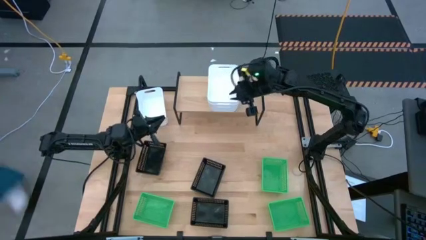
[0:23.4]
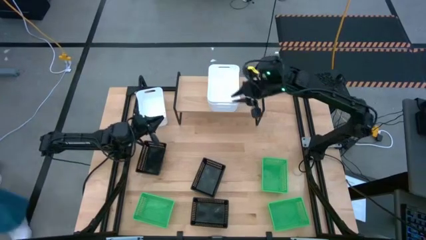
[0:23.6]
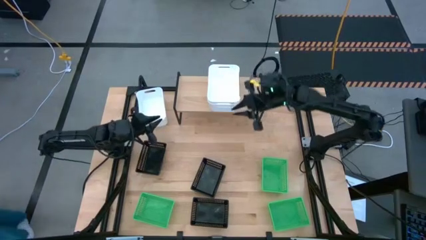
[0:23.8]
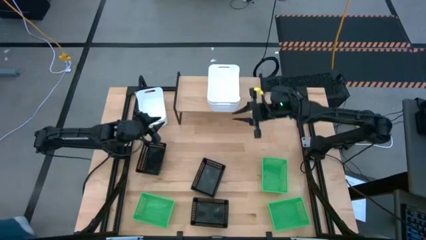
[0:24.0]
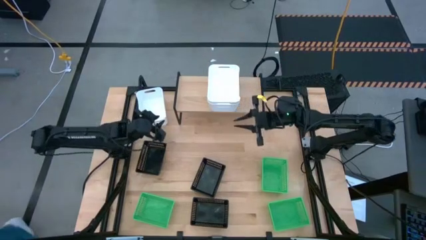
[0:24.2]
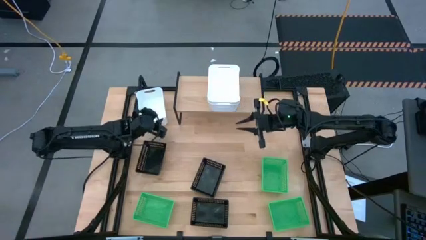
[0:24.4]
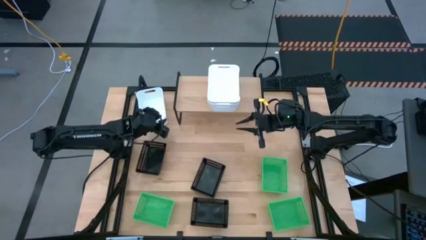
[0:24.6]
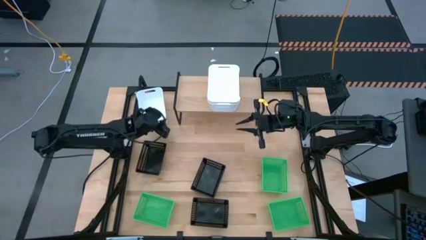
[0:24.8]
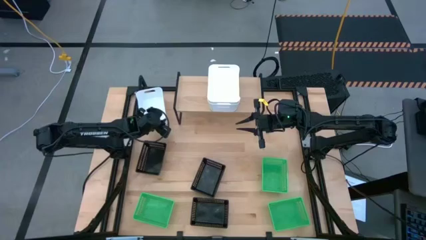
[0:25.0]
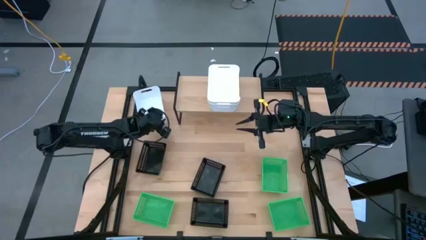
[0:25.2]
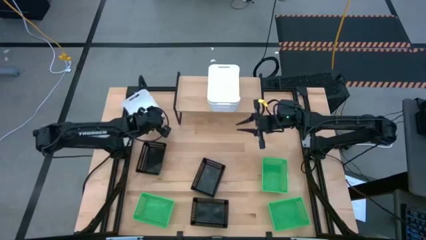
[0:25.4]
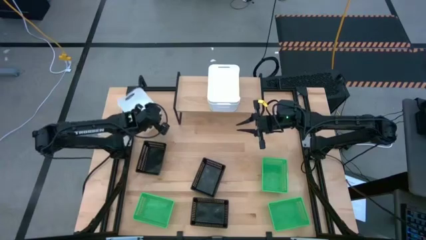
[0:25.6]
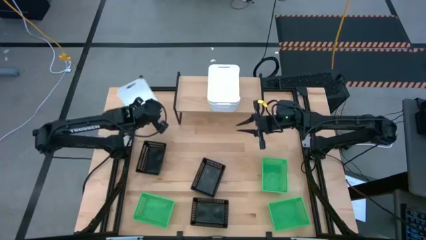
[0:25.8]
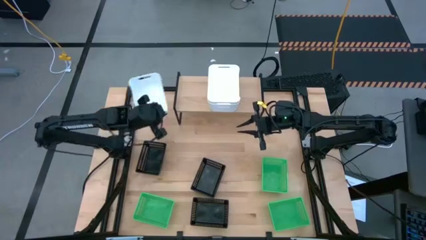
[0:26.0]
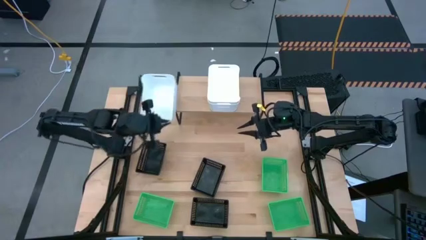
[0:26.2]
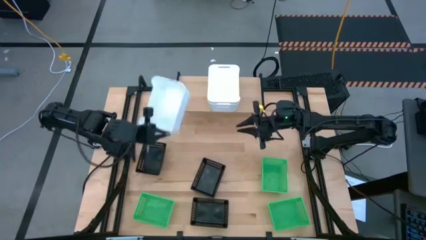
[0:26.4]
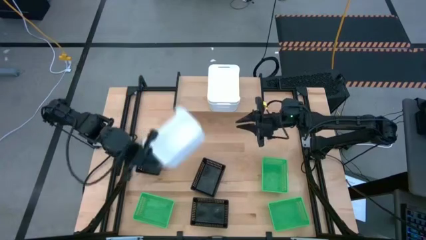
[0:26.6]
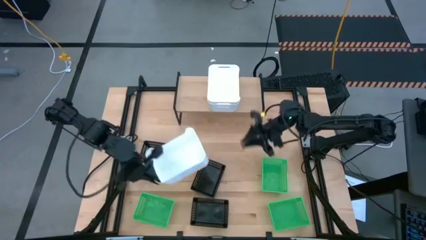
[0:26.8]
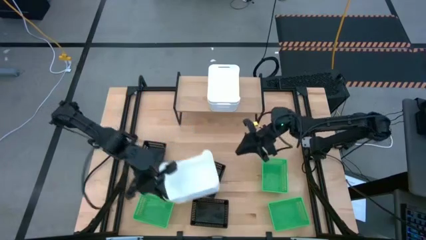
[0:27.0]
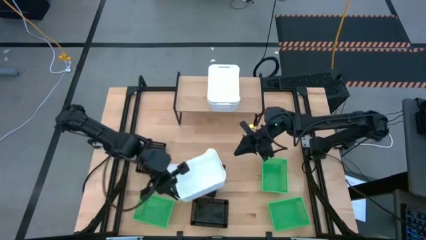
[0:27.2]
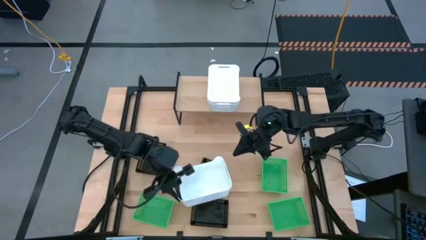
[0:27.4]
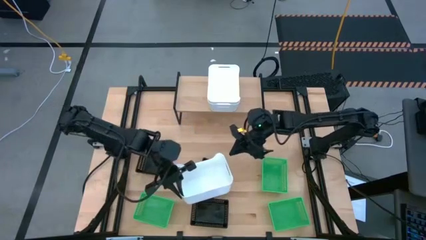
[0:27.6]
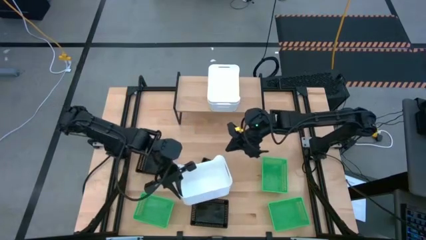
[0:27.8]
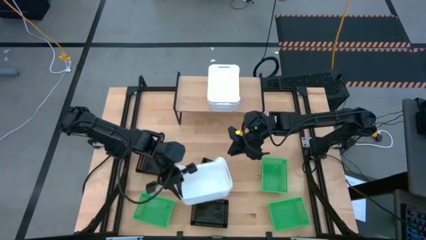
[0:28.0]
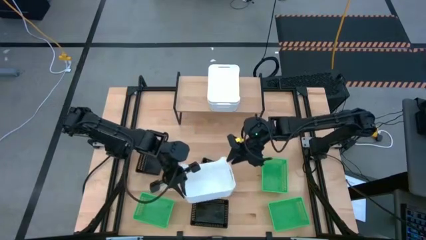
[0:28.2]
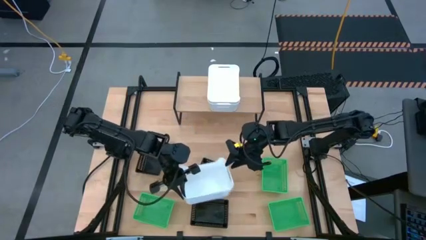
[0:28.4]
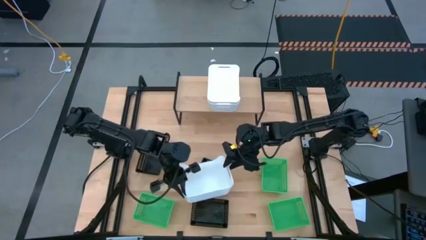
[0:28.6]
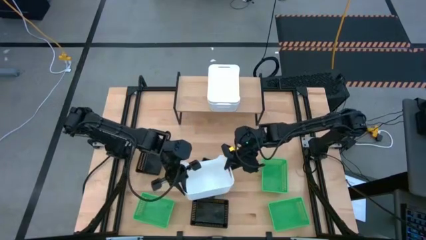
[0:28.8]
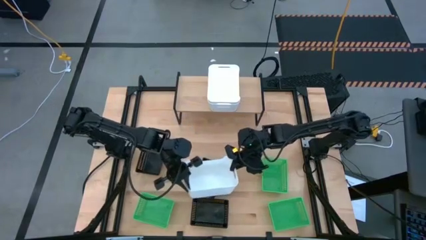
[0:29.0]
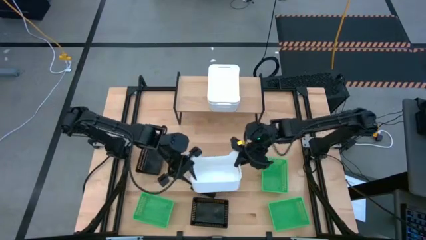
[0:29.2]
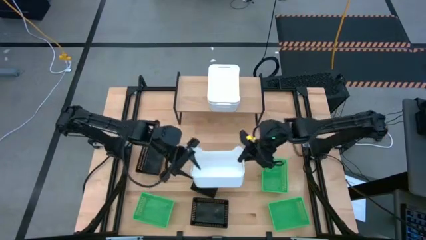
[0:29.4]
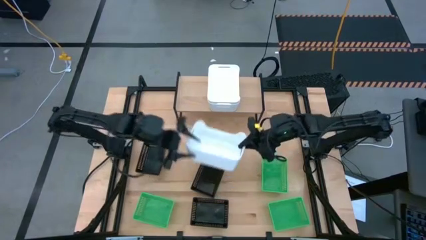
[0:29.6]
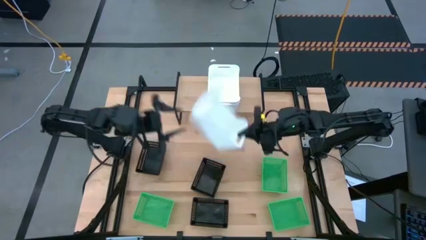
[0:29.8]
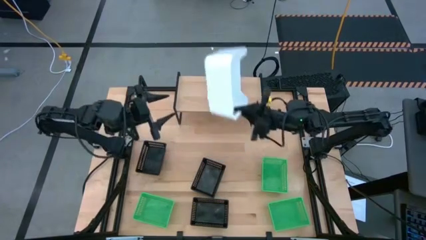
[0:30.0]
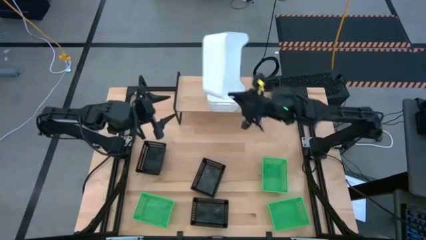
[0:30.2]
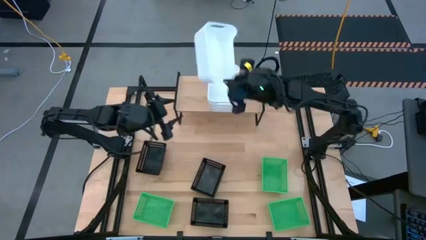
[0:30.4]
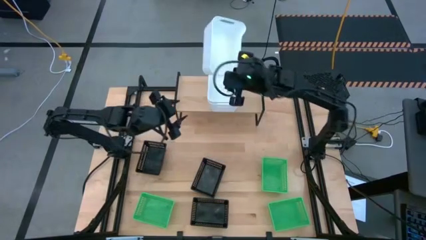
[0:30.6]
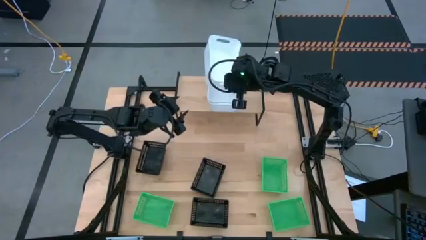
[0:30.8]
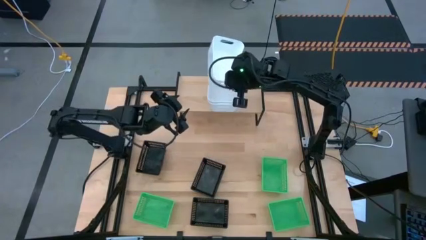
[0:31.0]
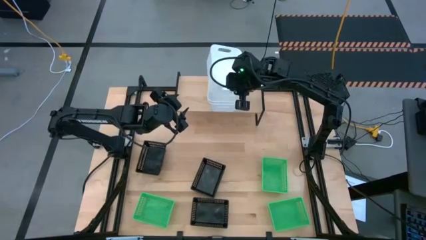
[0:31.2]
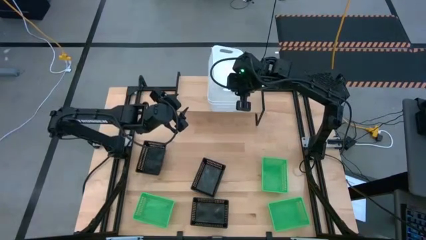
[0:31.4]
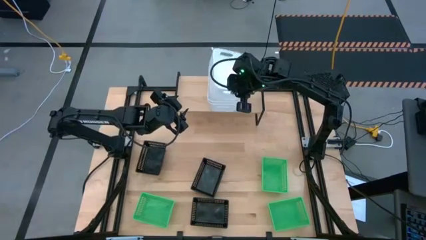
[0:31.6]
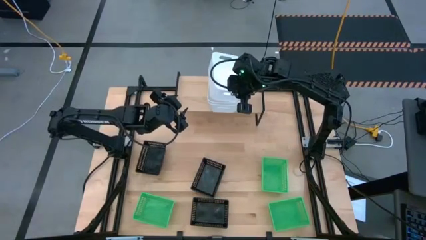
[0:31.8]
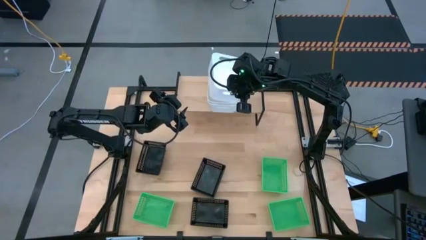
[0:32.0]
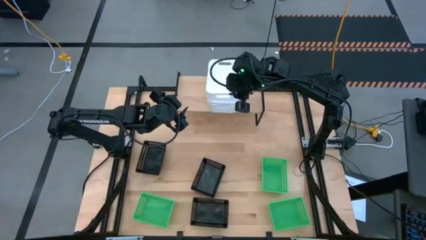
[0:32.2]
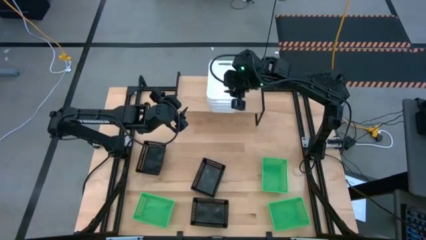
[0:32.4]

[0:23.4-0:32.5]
Task: Stack baskets on shelf by color
Stack the white bin on top of the other white bins on the shelf

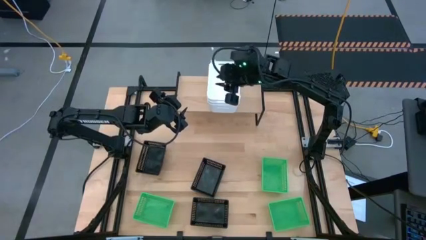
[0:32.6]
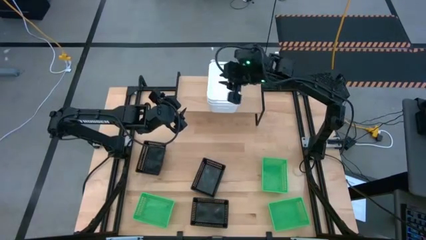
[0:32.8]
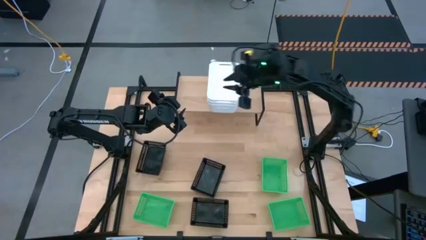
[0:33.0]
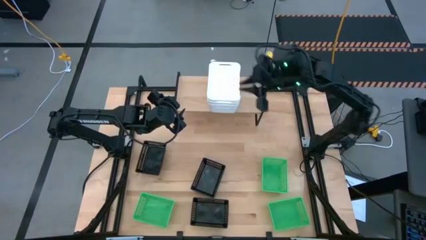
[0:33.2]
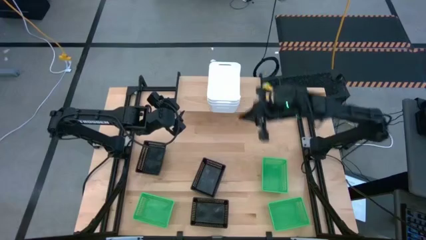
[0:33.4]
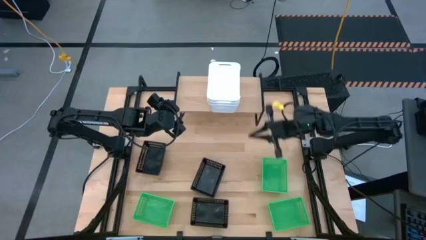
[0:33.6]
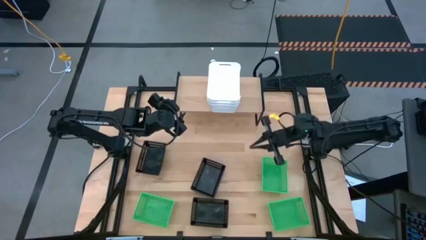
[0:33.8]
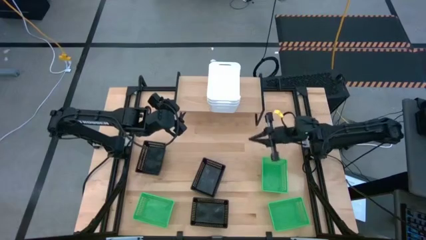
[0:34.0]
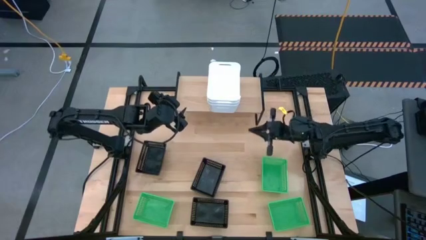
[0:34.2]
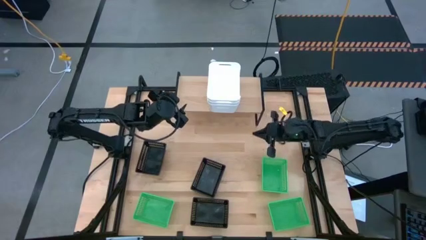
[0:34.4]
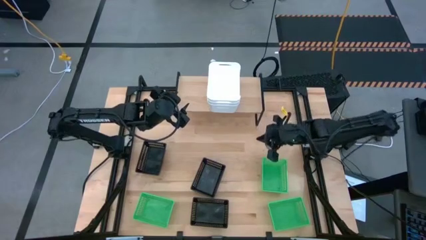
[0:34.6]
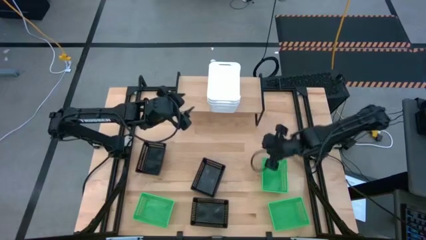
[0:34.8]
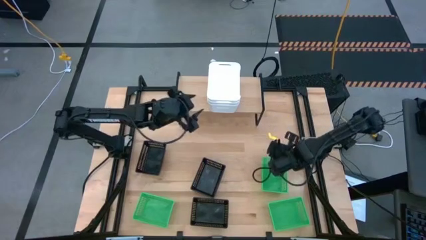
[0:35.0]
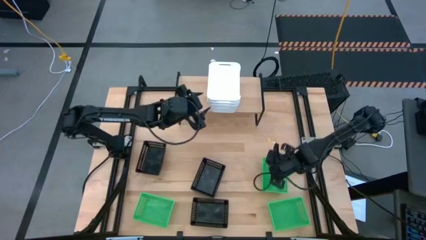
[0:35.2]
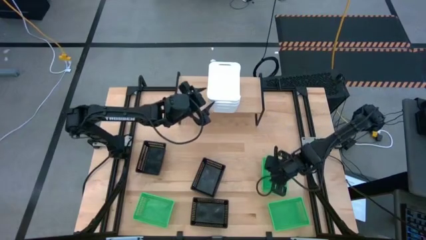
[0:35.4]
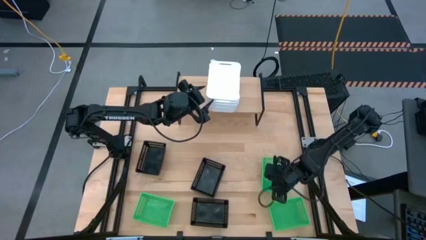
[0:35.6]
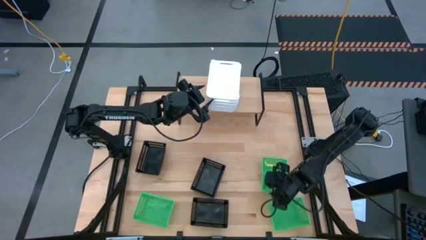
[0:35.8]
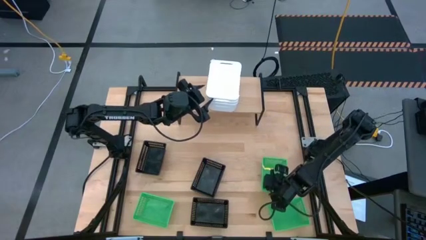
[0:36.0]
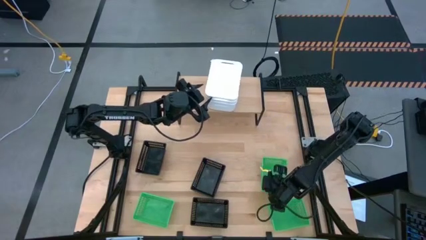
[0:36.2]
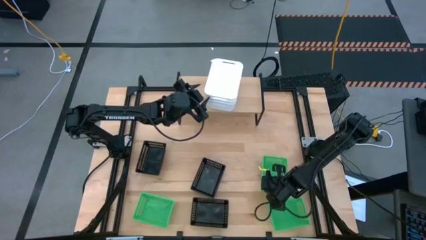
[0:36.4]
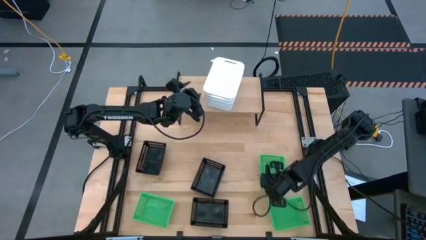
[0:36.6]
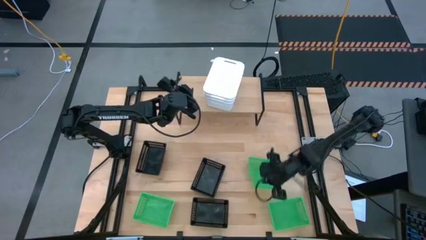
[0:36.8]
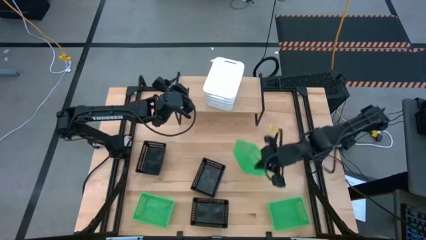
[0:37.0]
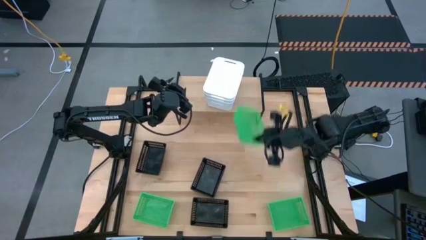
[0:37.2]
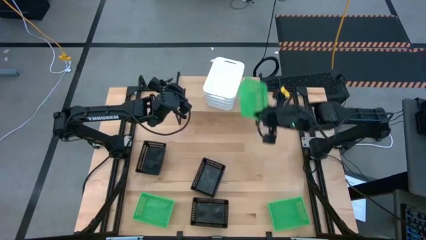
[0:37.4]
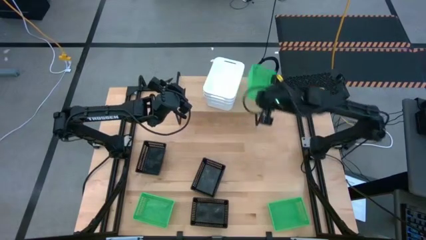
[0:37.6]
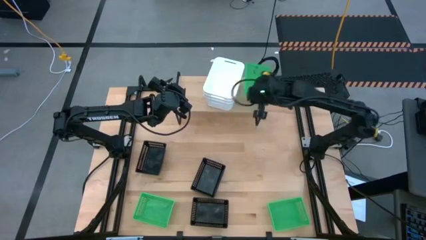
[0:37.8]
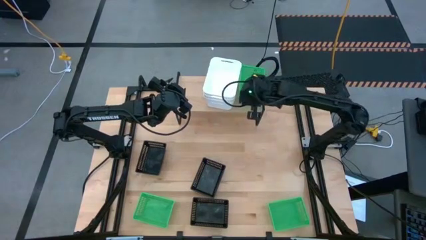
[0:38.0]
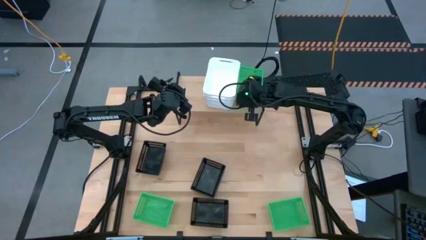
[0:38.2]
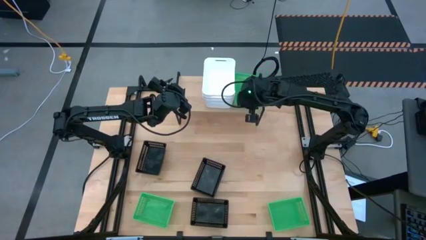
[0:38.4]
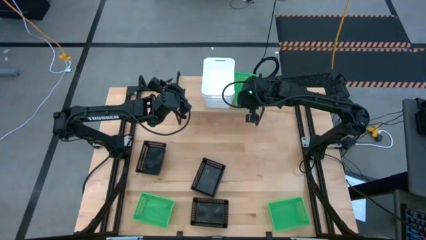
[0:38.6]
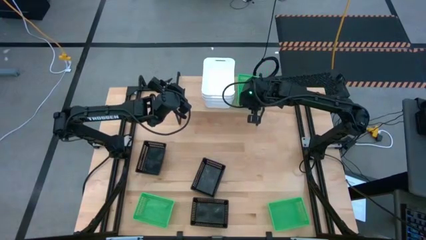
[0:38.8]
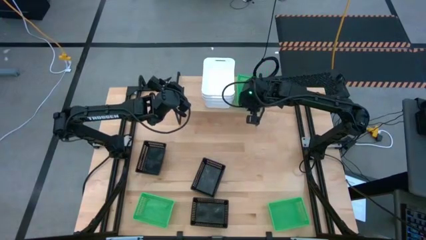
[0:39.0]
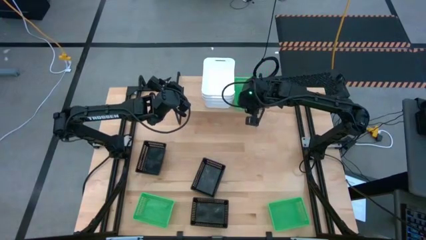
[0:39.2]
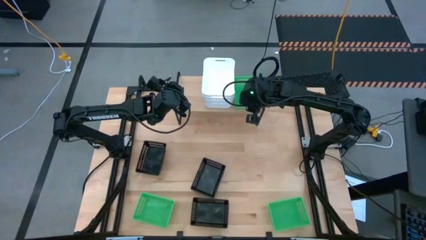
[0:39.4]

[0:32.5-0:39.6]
Put the top right green bin on the shelf
